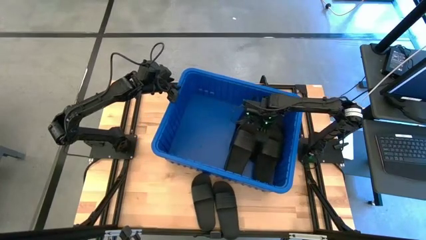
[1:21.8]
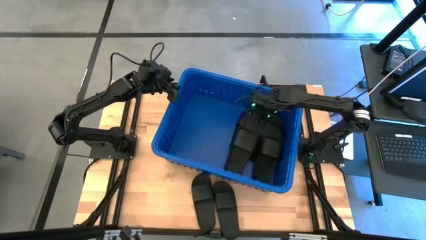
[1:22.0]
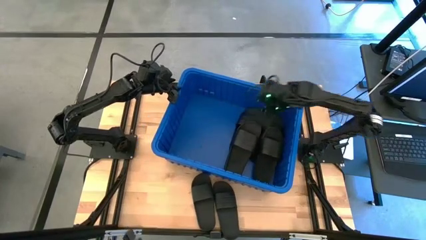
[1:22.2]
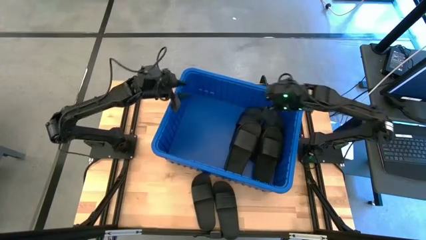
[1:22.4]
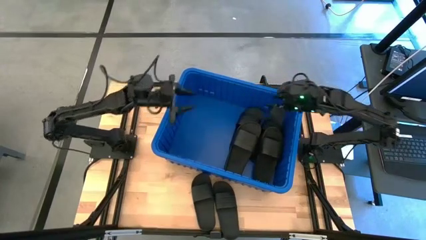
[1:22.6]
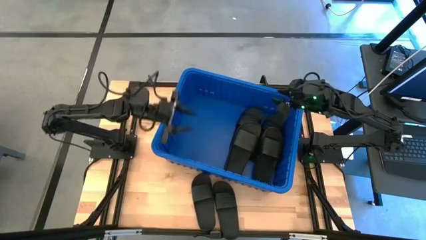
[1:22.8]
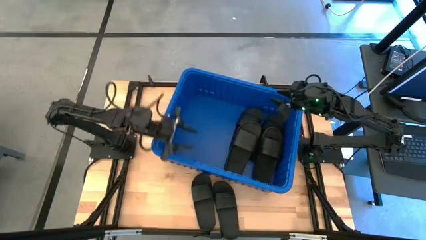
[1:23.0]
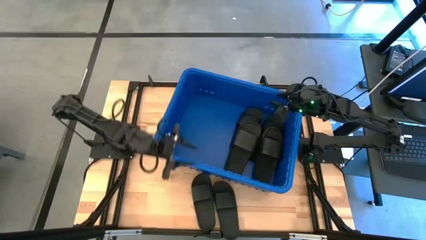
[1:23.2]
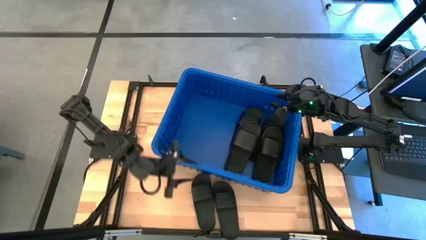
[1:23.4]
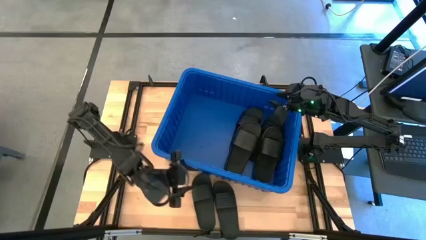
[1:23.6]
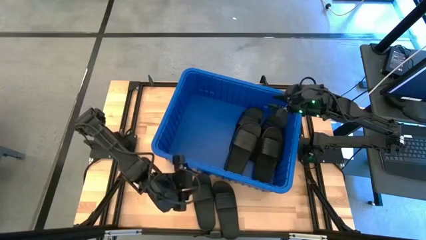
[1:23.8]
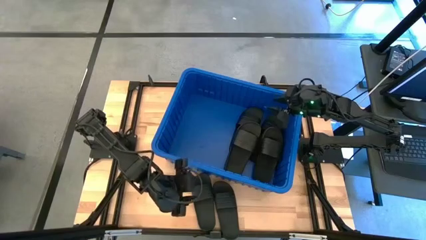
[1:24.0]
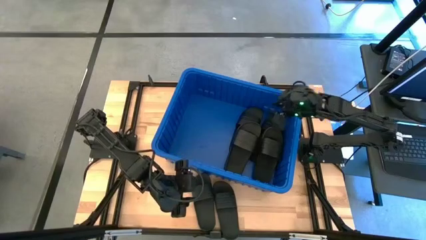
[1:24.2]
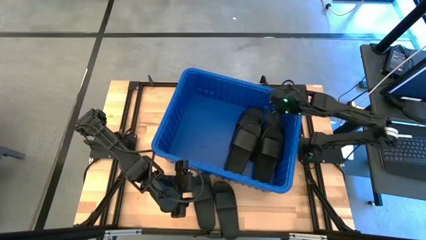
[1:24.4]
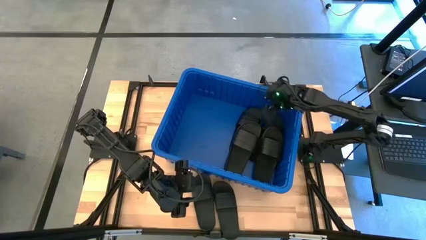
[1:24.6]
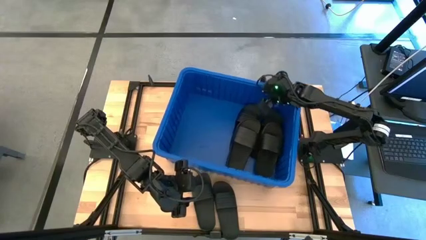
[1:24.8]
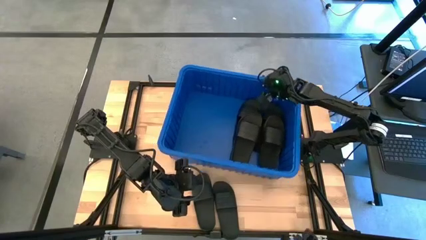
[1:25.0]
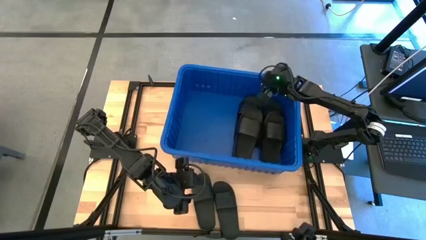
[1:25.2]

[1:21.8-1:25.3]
Task: Pick and place slides into bin
Adjust the blue organizer bin

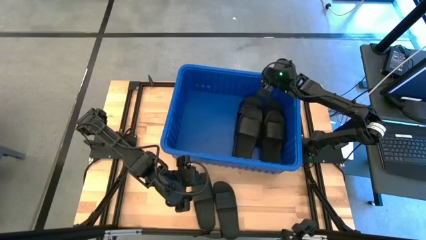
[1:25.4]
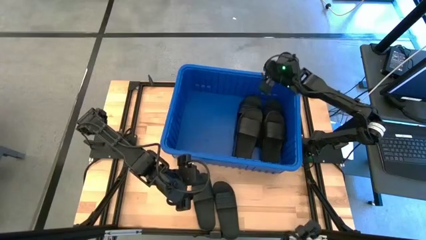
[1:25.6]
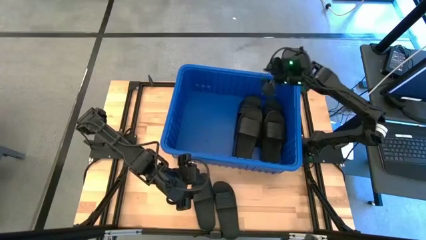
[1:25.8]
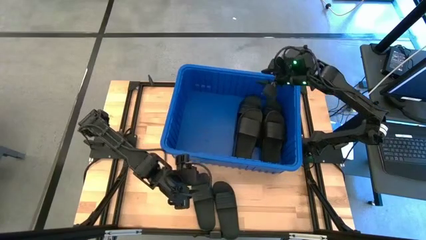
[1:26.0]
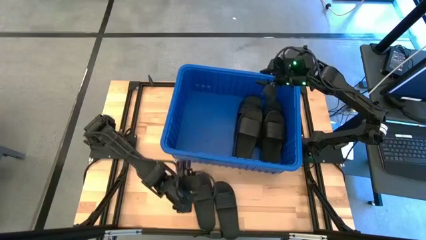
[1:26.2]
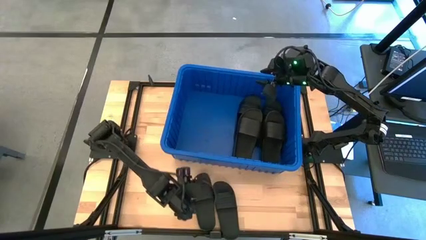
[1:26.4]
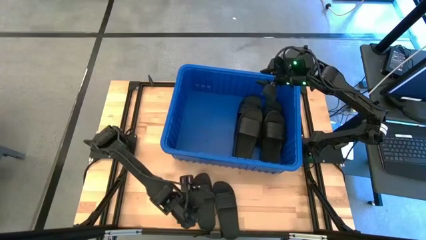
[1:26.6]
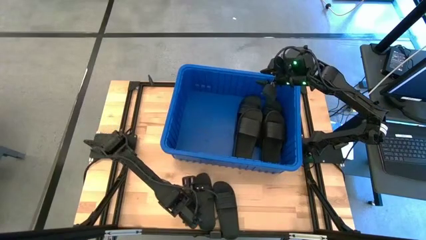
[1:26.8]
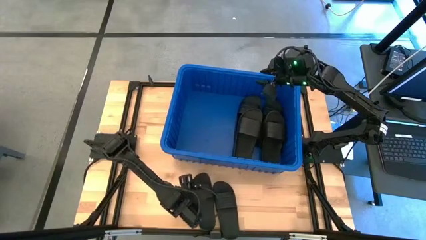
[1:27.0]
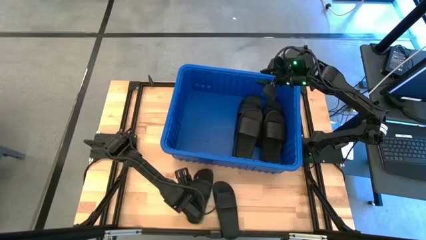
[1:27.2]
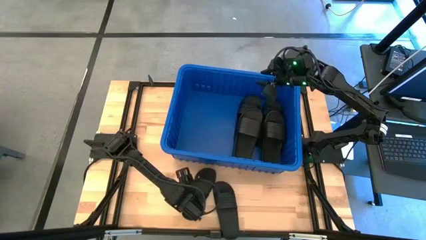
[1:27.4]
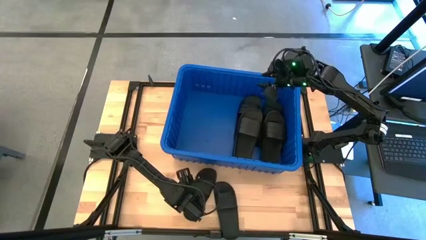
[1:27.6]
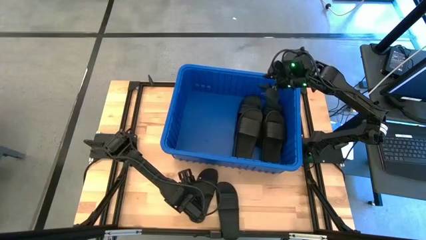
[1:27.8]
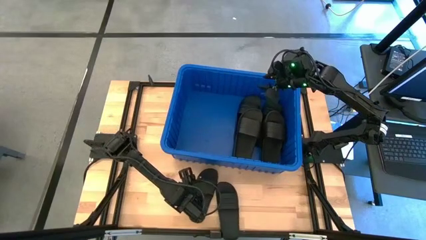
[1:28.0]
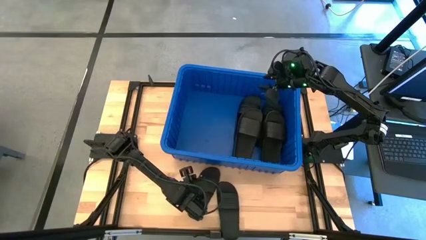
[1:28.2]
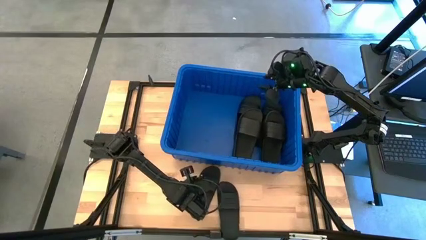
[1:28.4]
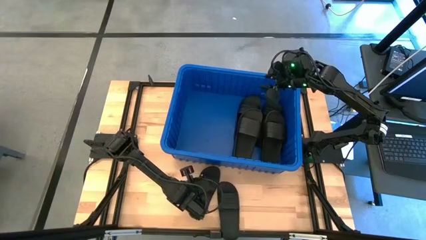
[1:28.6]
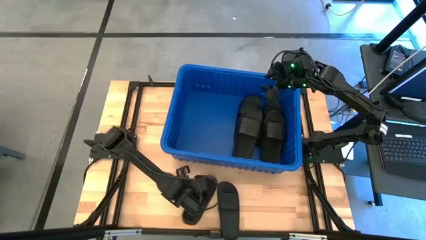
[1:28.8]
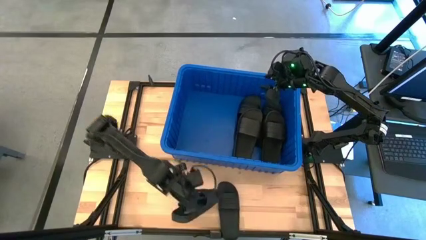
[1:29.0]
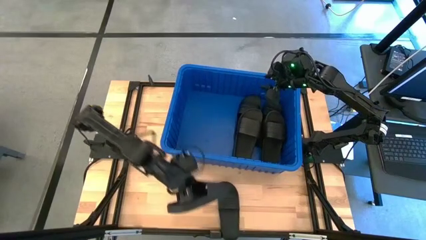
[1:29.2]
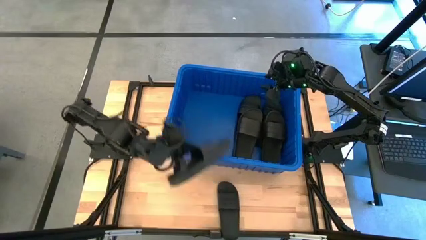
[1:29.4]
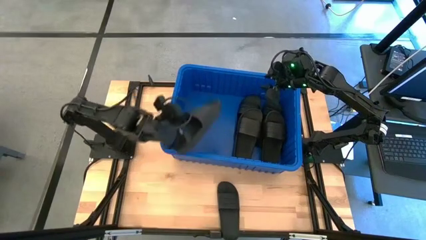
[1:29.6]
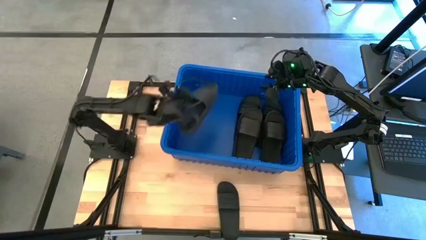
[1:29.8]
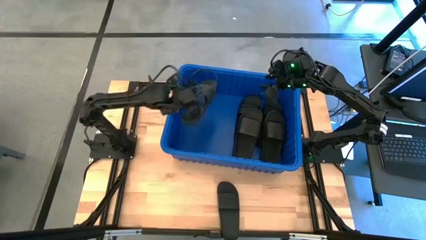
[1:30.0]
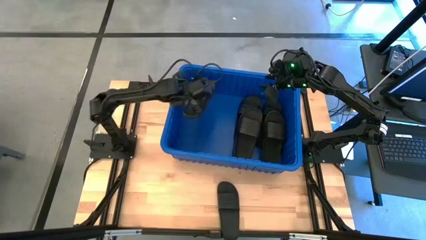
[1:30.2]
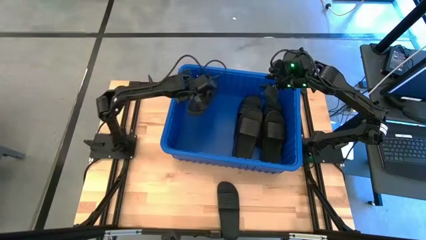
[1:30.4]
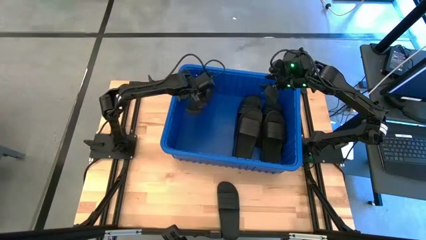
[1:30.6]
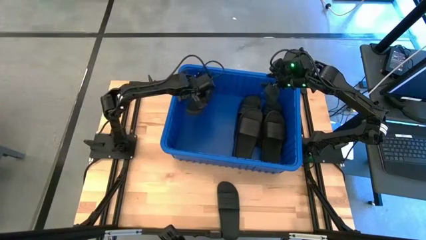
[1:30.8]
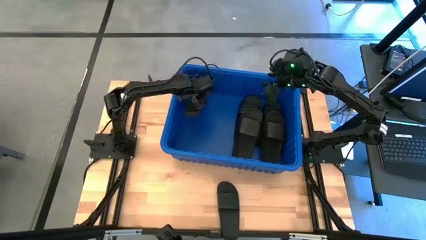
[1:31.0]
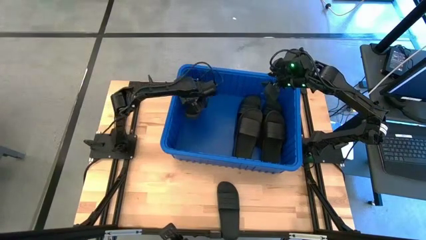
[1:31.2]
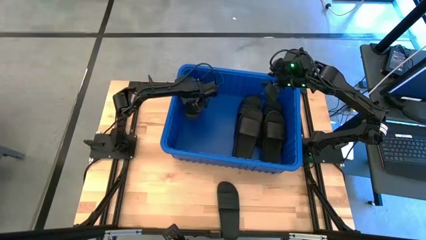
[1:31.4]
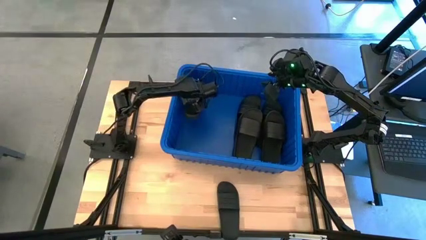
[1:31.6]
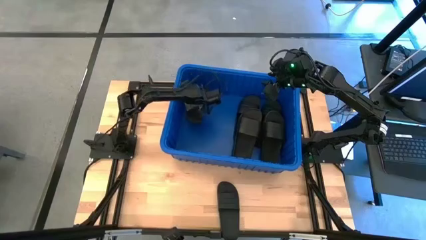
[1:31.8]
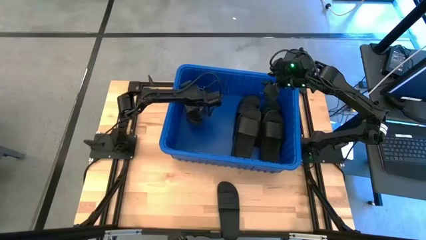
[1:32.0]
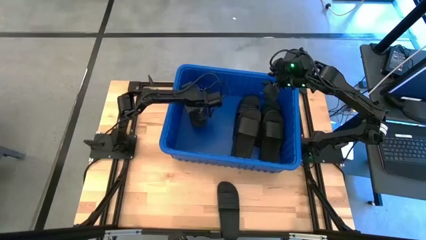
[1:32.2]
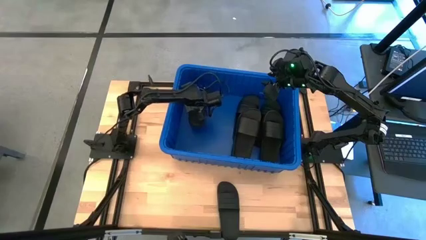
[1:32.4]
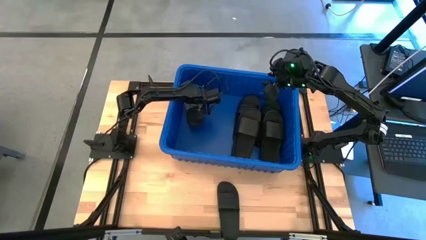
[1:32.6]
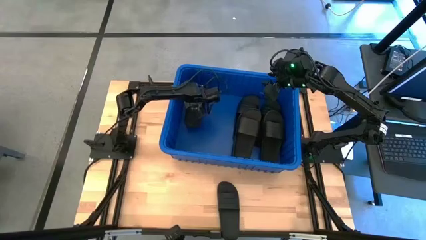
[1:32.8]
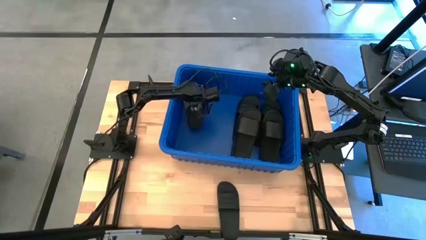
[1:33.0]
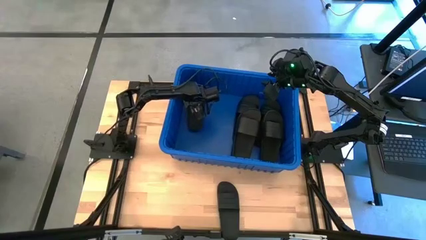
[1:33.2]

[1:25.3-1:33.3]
Put the black slides into the blue organizer bin
